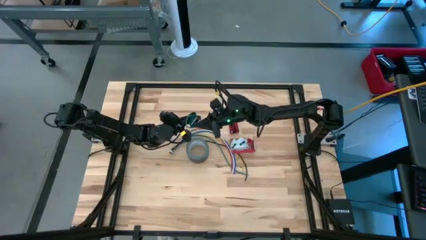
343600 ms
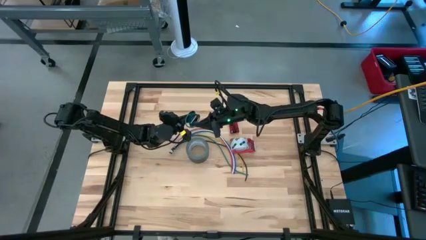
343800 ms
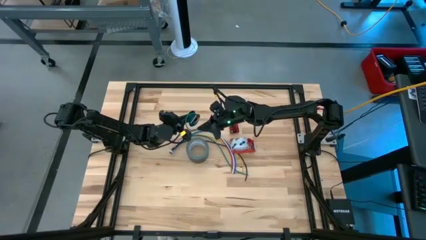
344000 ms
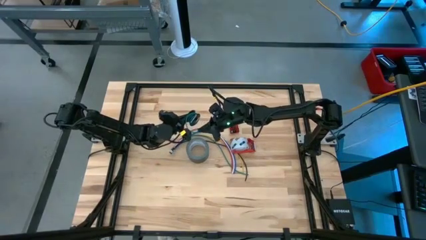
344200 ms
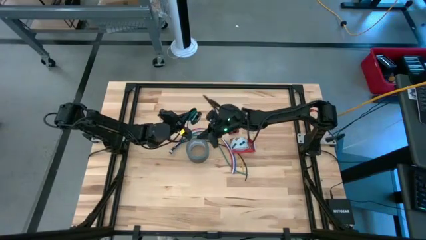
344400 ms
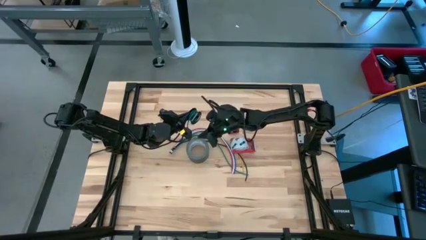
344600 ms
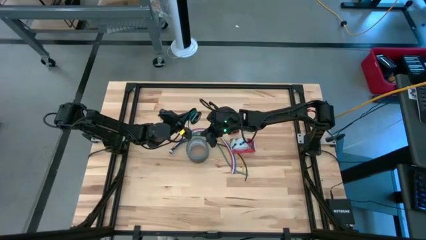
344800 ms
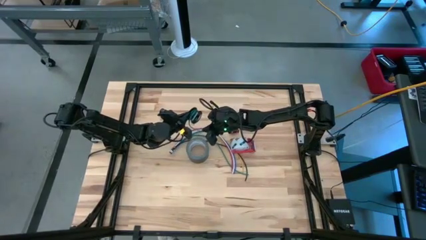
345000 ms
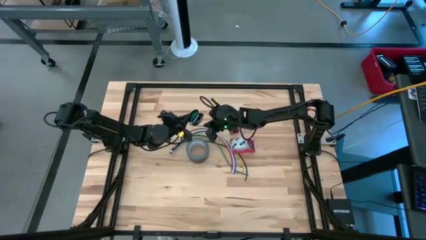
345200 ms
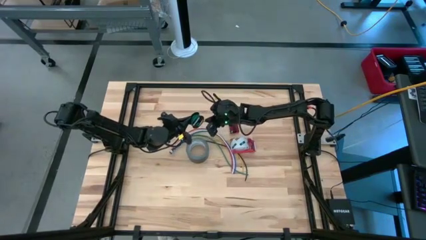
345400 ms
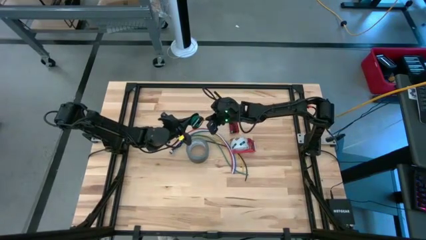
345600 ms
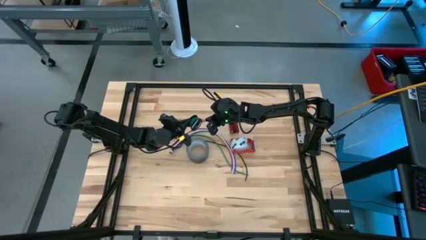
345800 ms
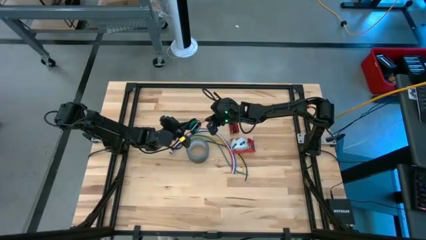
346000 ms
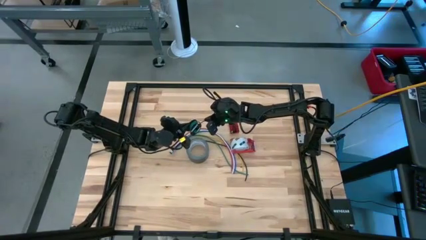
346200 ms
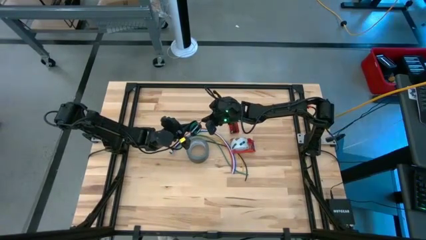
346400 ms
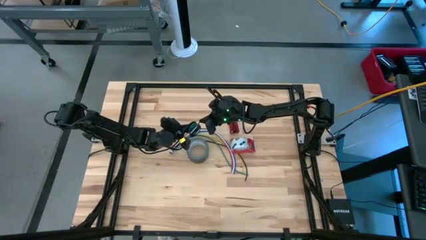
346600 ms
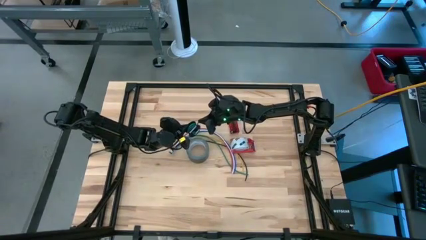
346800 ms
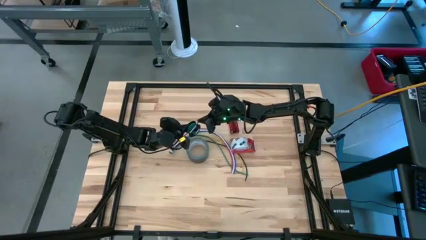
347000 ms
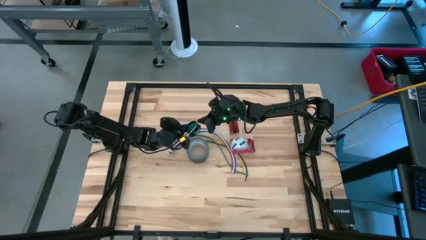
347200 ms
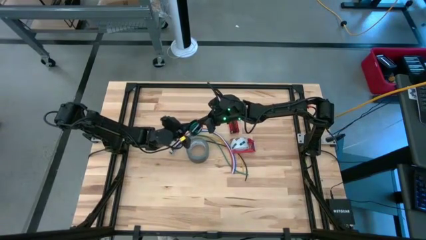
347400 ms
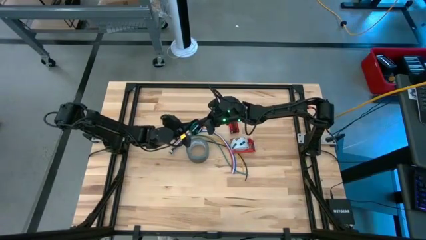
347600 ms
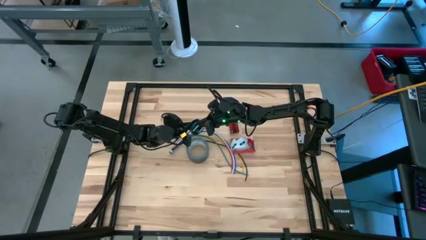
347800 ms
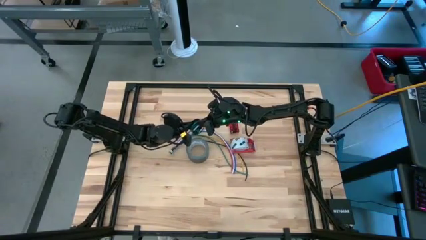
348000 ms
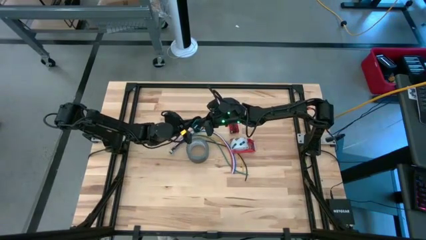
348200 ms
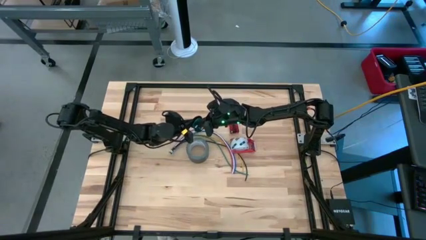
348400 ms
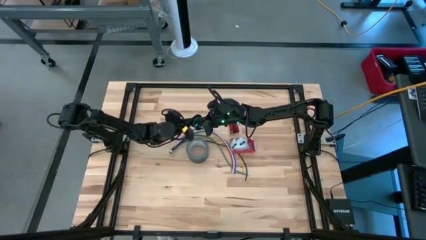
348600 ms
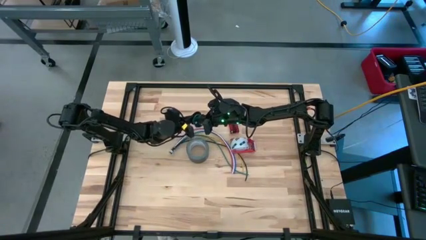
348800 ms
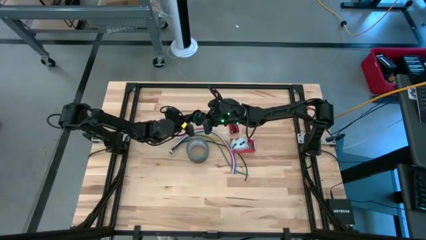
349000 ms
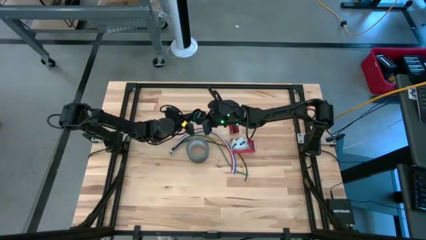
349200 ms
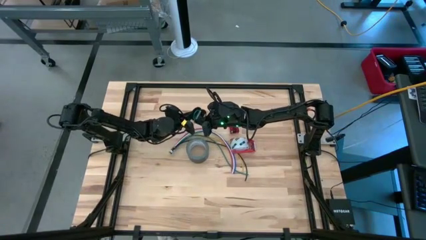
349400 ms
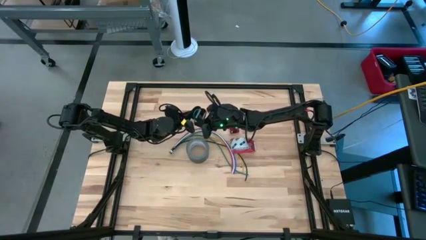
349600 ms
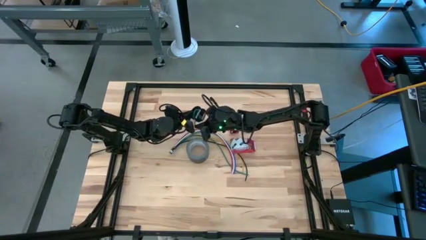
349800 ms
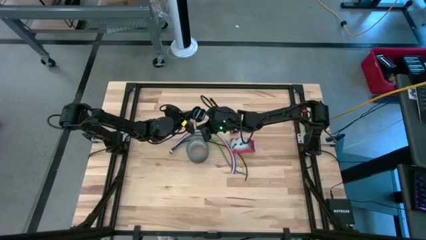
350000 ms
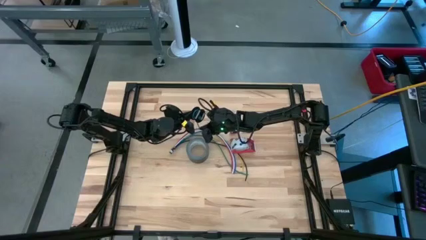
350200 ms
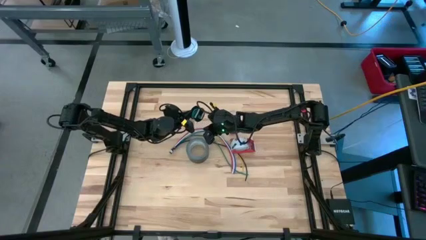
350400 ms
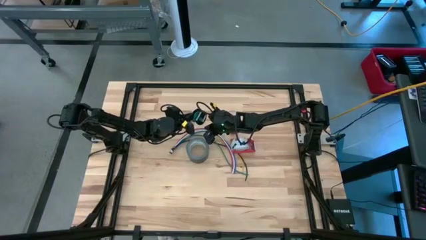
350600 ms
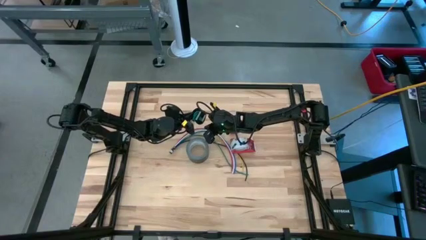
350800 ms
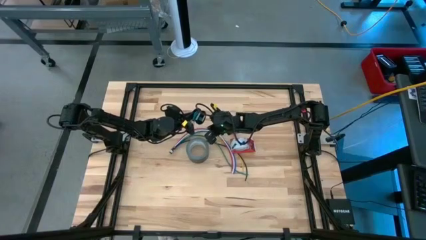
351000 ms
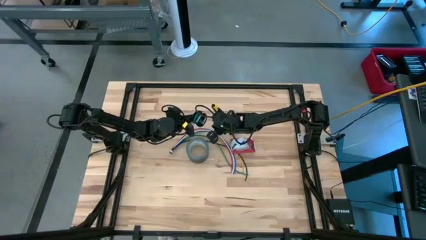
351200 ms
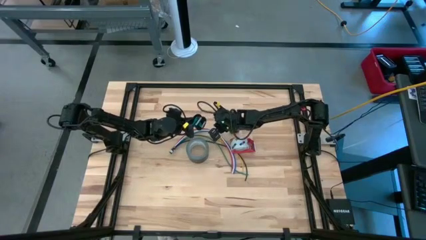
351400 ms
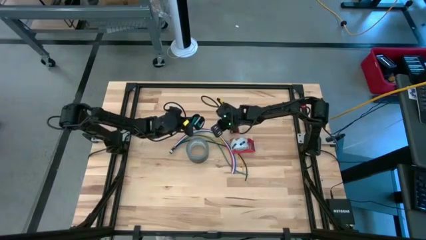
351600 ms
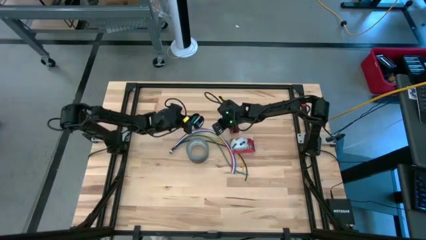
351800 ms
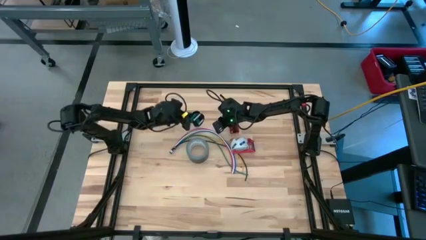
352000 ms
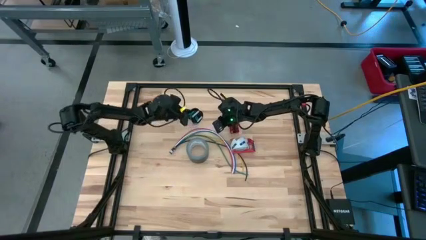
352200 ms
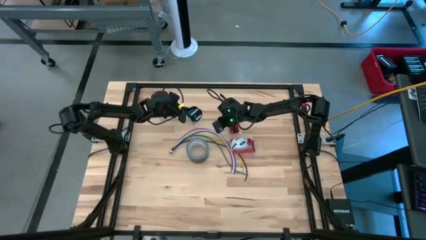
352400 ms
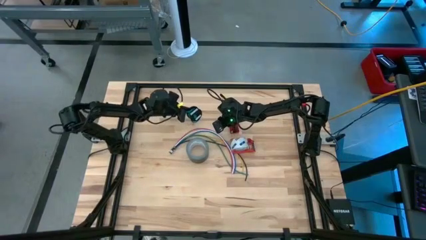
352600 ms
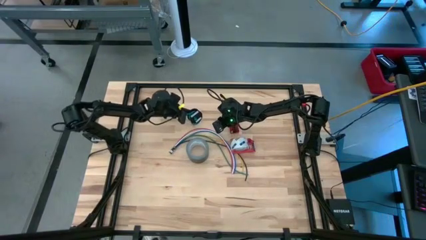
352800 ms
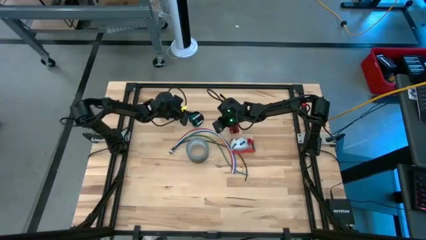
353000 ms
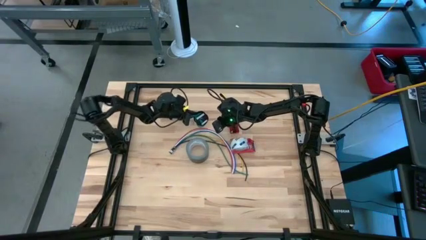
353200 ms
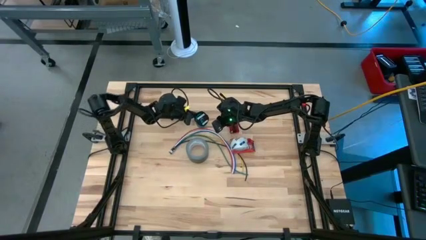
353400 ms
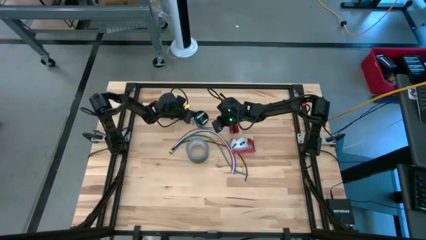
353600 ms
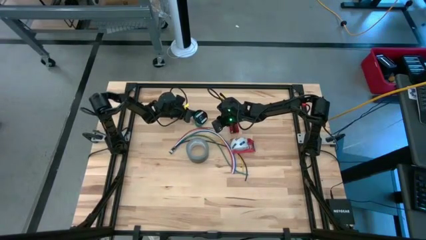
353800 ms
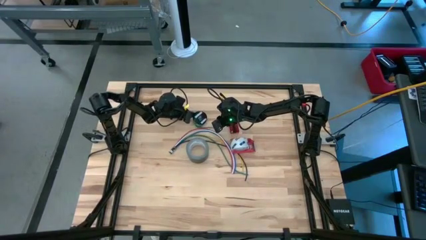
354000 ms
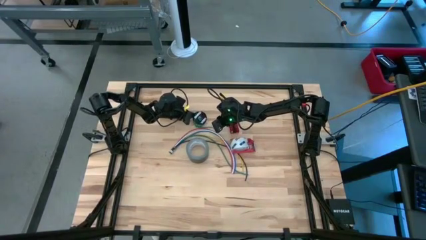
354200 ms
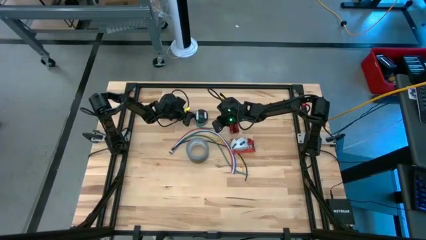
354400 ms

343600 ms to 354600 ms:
Task: Coil cords
Coil the green wire onto the black spool
